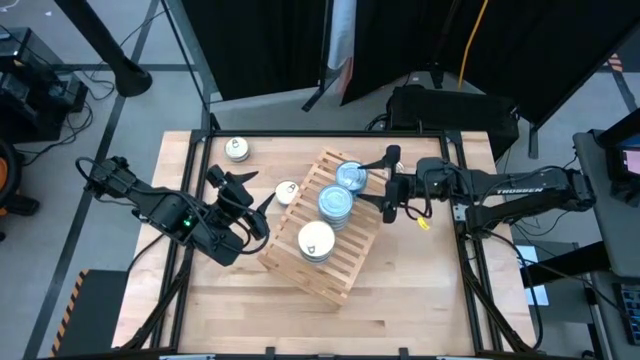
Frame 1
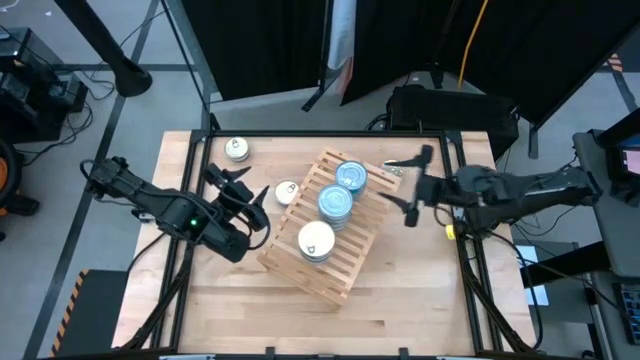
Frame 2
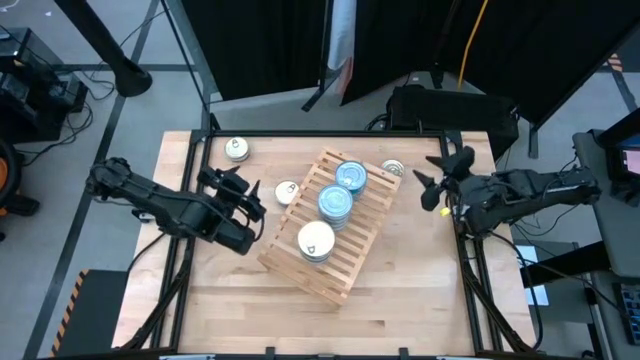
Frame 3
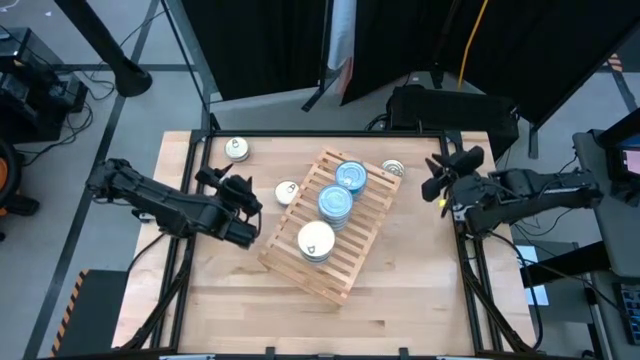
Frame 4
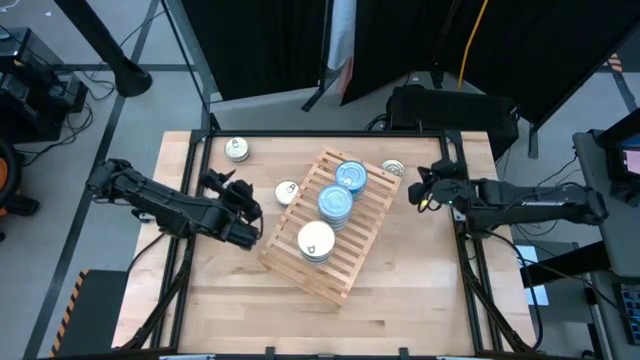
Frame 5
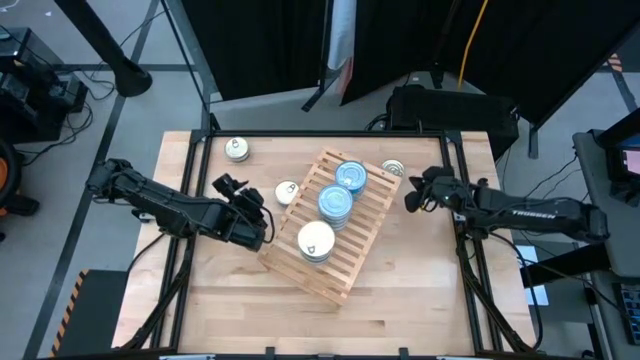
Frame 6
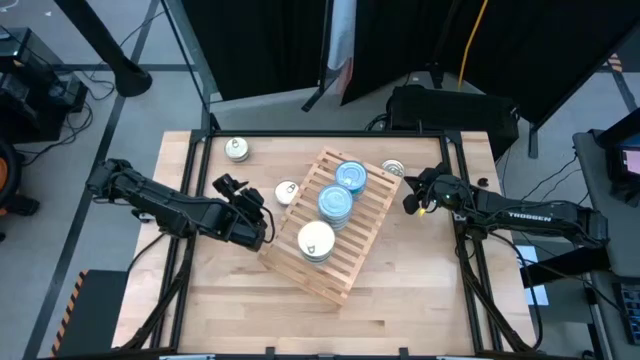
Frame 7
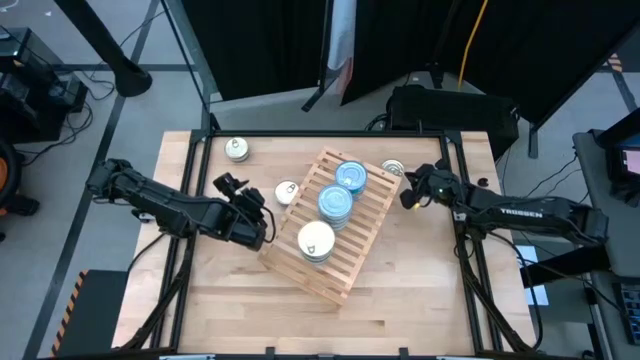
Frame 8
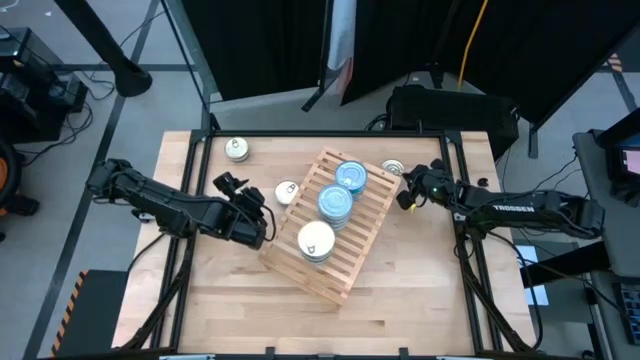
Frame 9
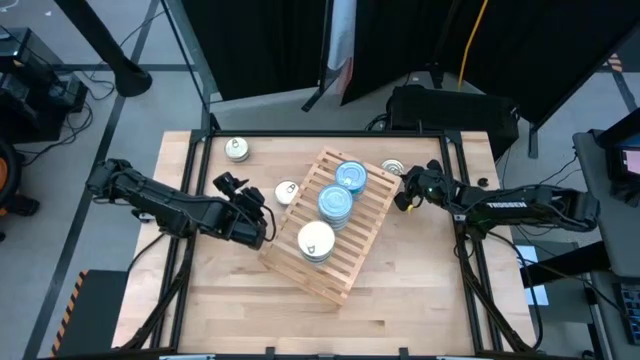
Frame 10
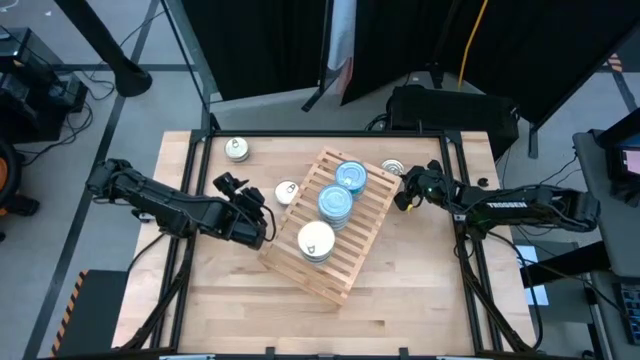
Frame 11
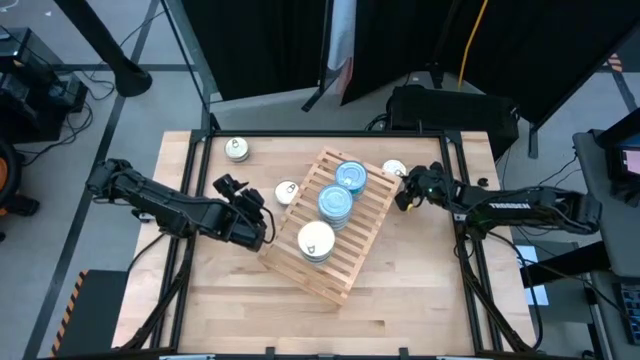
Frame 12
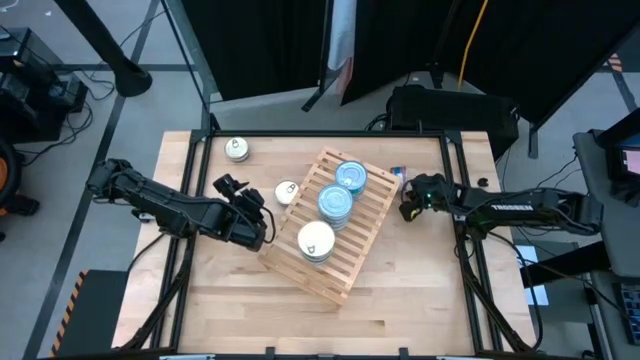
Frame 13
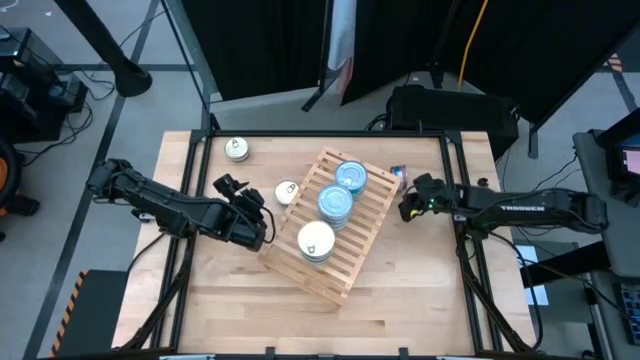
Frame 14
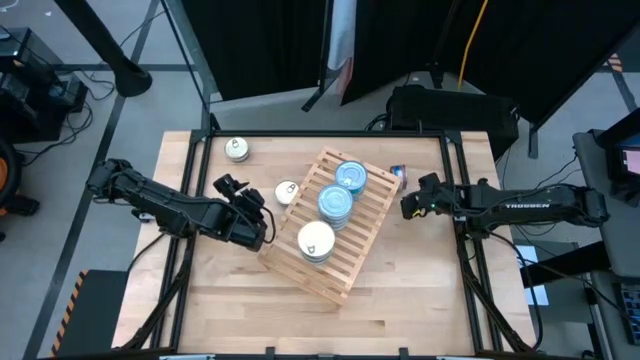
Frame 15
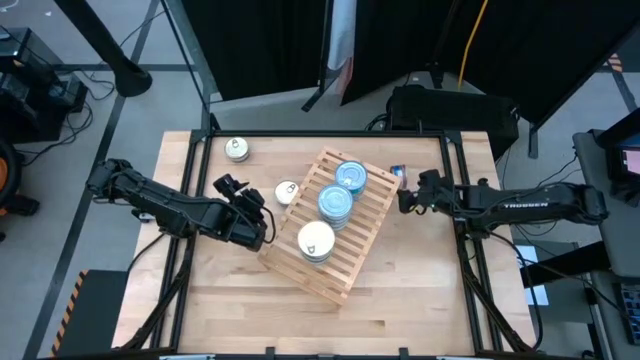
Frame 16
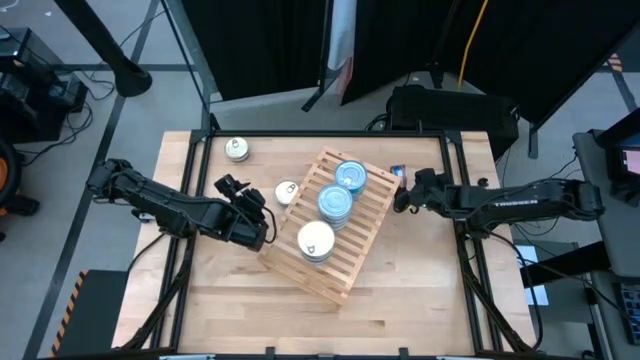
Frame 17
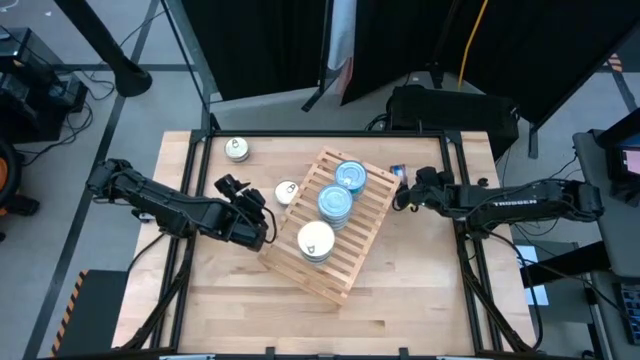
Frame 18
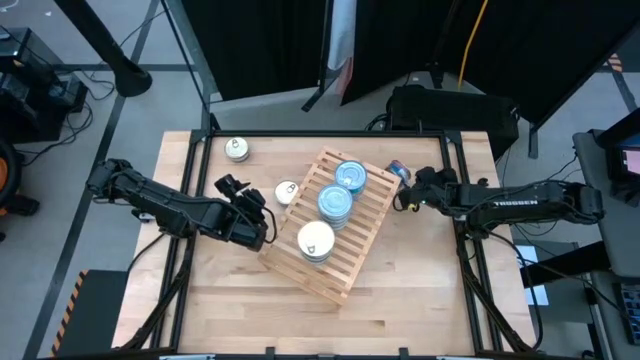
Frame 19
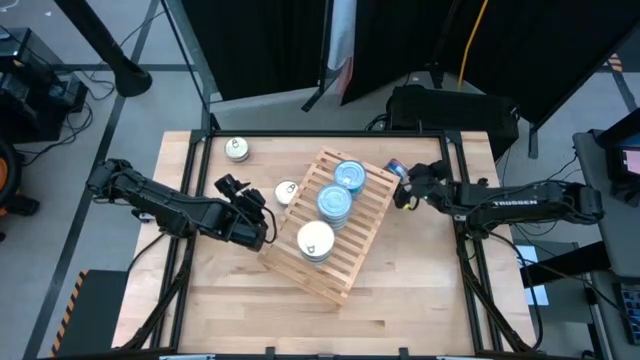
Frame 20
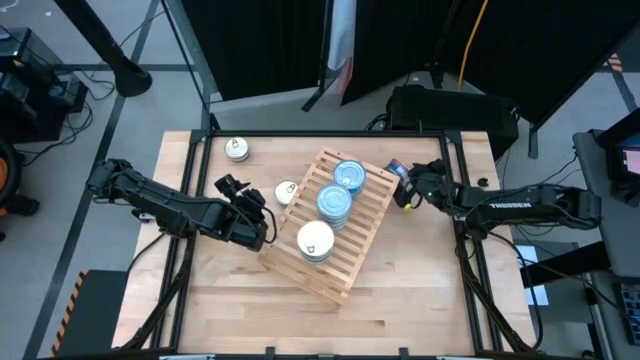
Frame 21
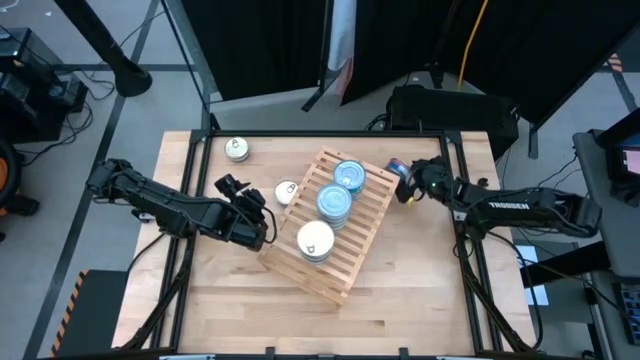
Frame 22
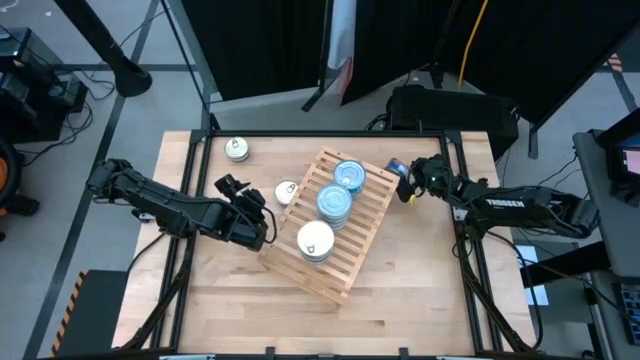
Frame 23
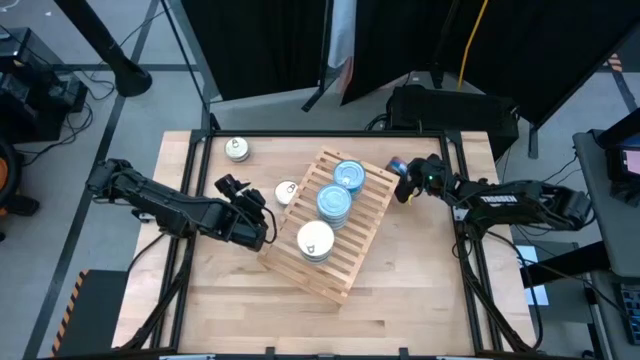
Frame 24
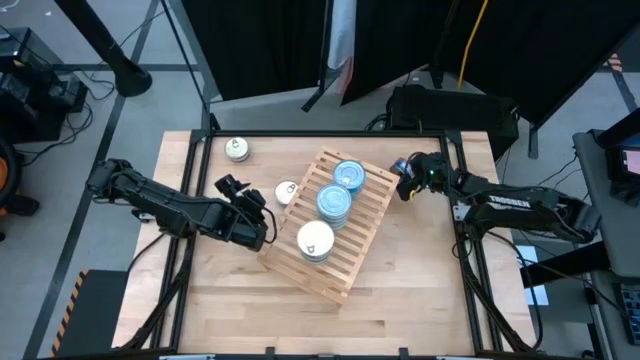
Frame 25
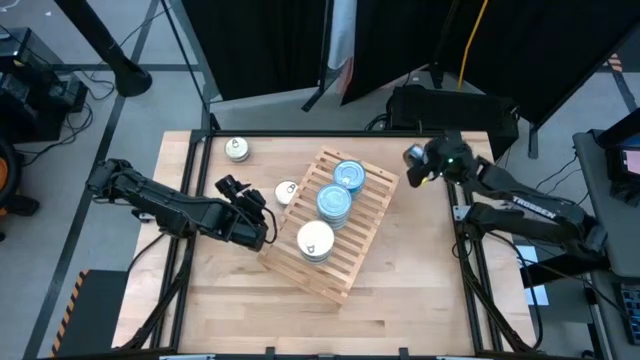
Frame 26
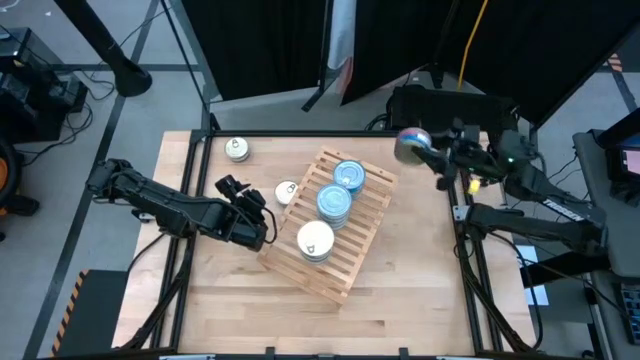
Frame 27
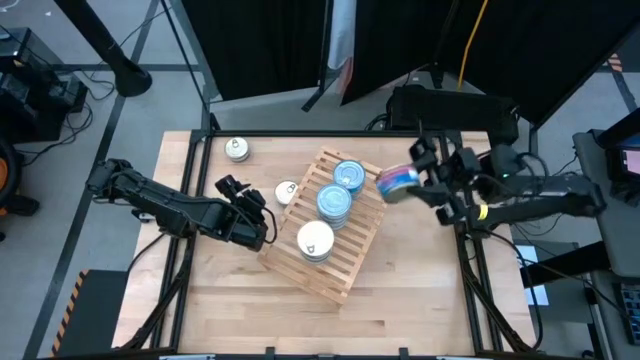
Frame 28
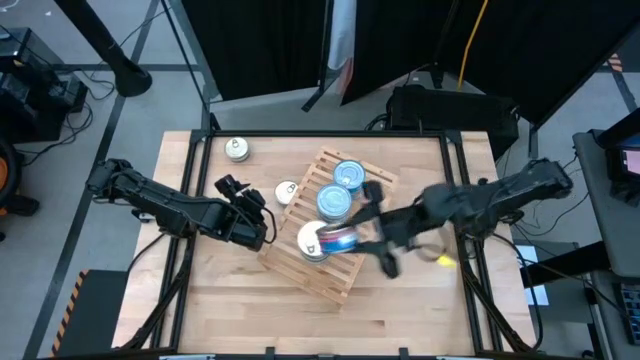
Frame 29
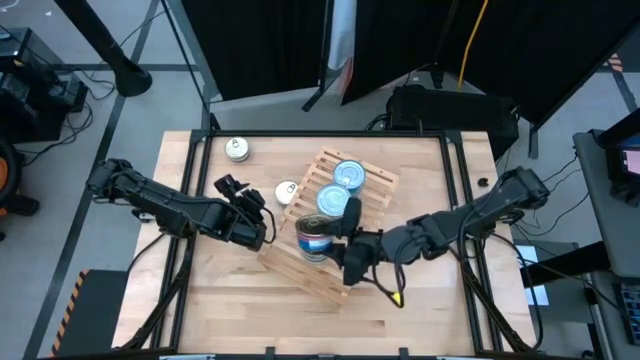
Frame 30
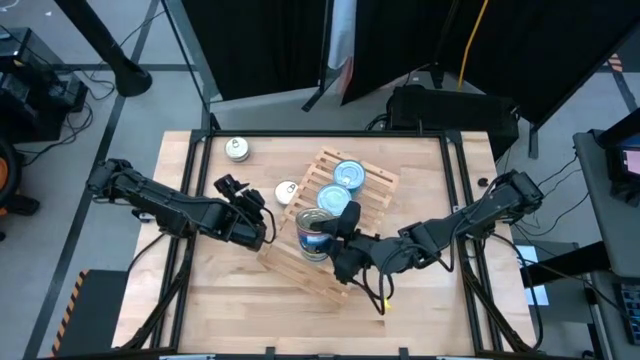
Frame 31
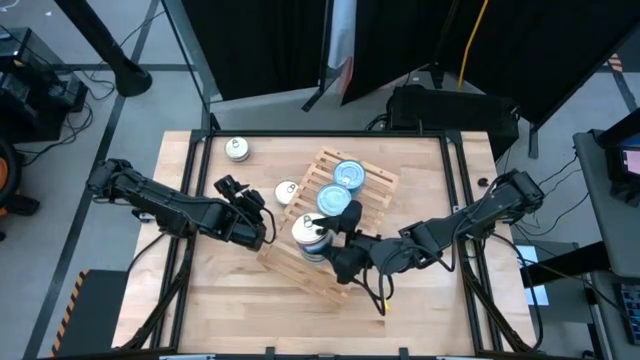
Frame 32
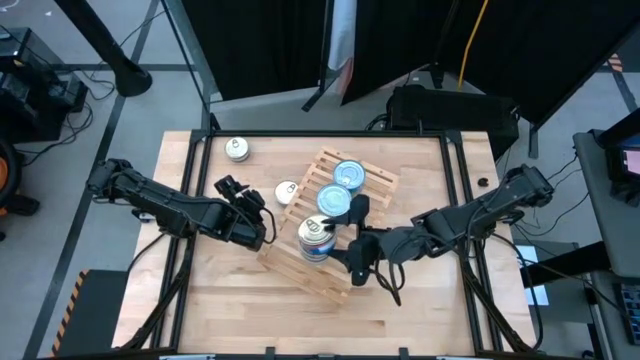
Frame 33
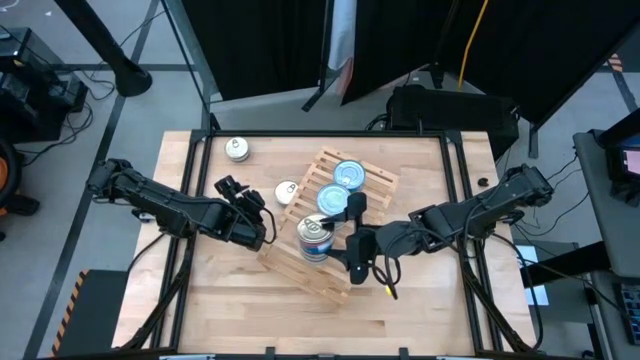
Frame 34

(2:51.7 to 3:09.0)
Task: Stack canned seafood by type on shelf
Stack the blue-pink tuna can on top of the other blue-pink tuna can on the shelf

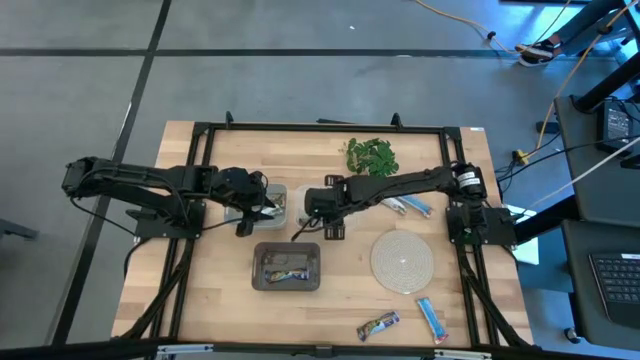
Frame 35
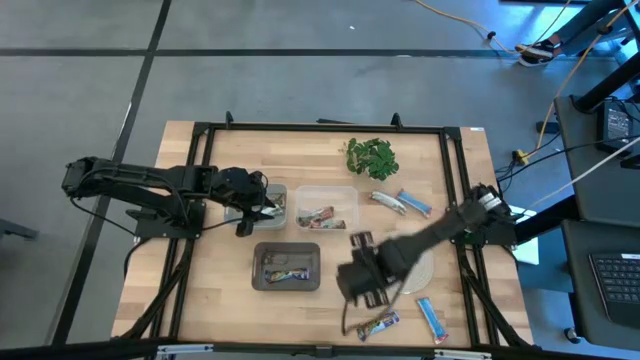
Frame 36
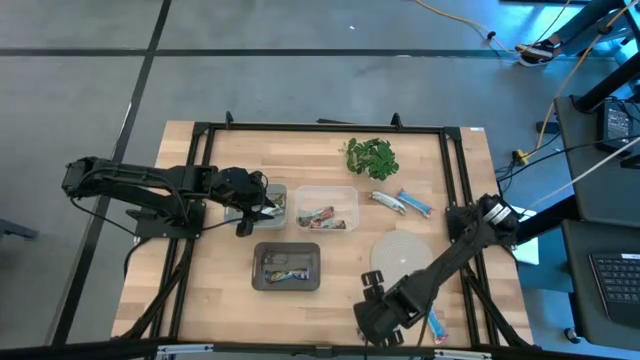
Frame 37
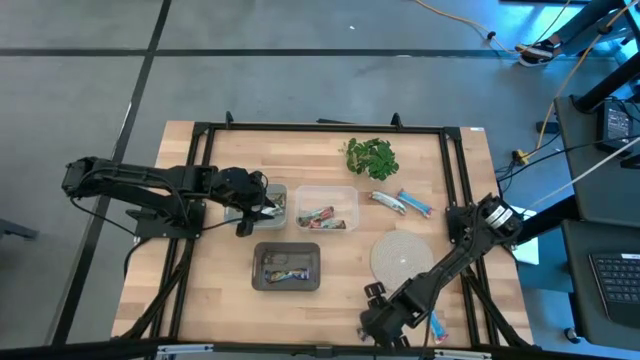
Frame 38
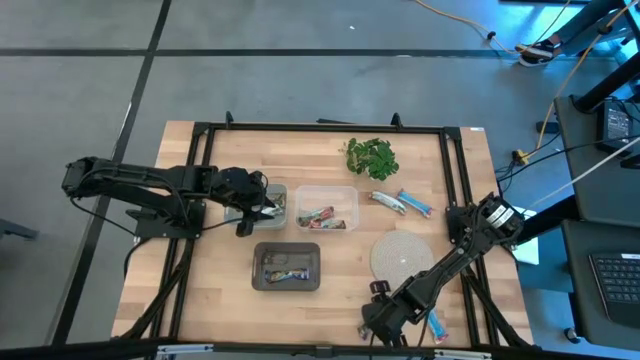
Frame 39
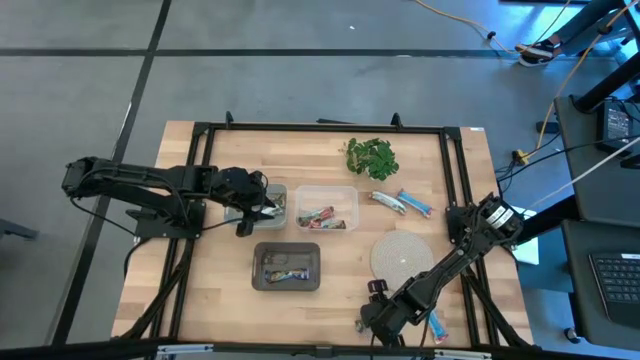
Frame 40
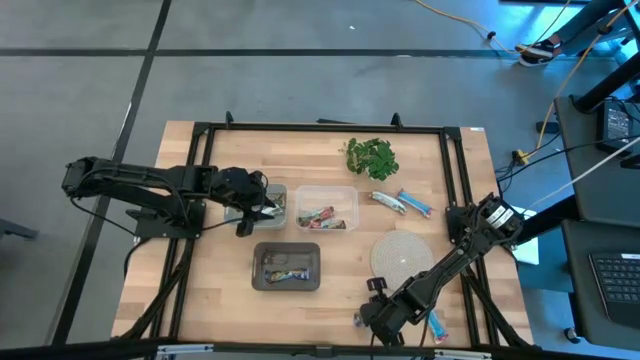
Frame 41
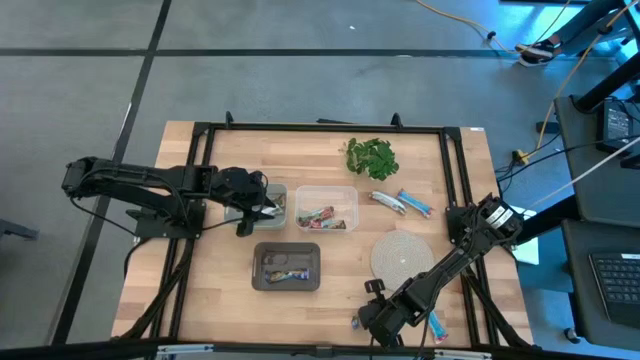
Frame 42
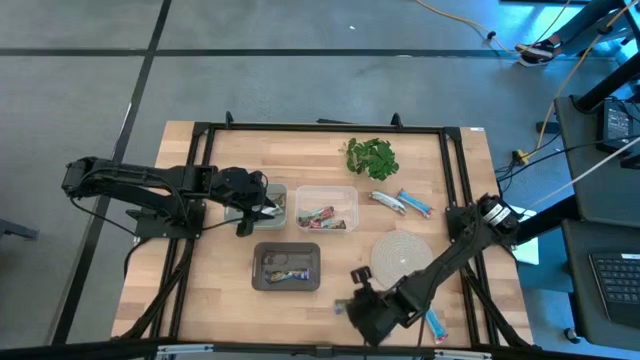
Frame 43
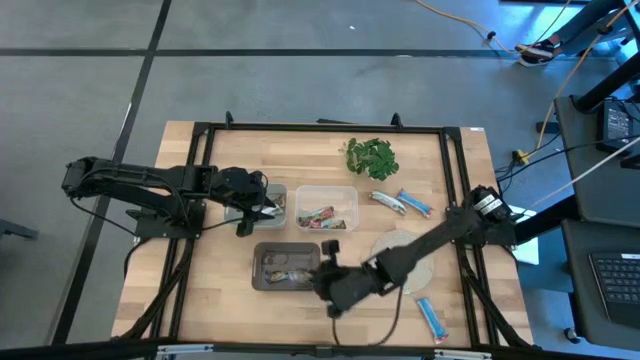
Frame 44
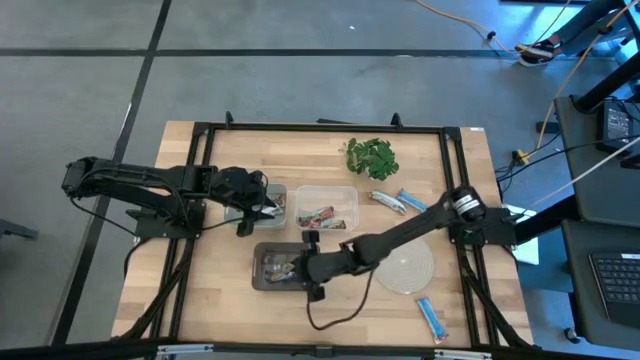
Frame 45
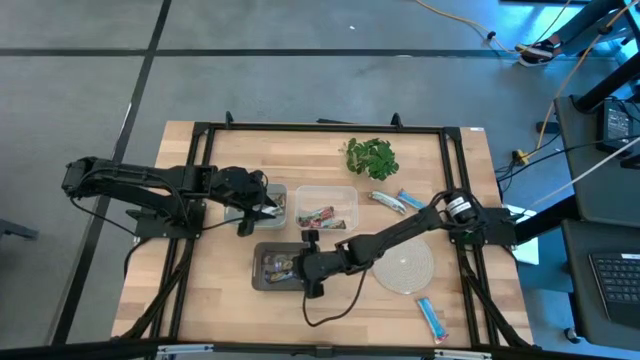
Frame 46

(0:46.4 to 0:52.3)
Task: Pick and place Granola Bars by type
Put the blue granola bar into the black transparent bin
